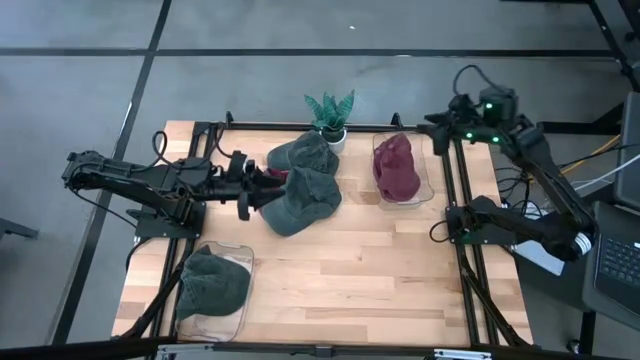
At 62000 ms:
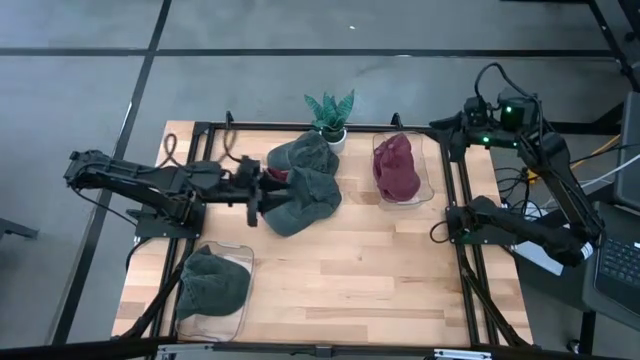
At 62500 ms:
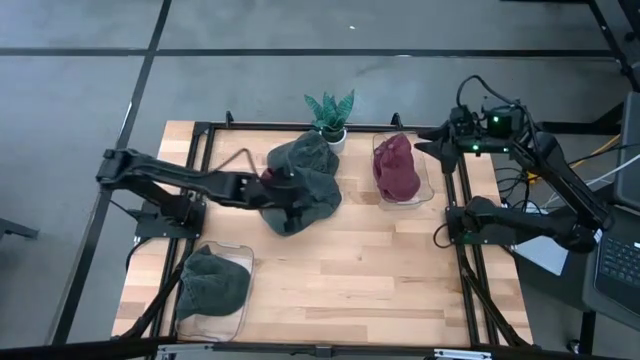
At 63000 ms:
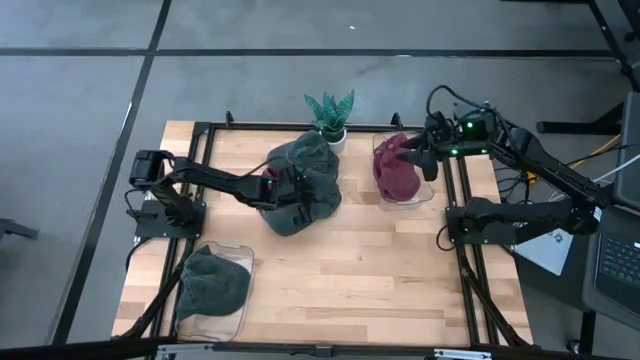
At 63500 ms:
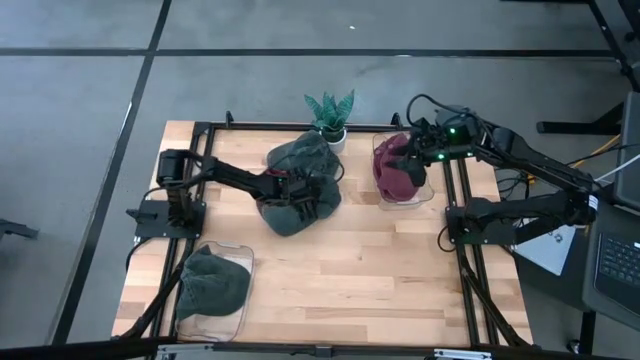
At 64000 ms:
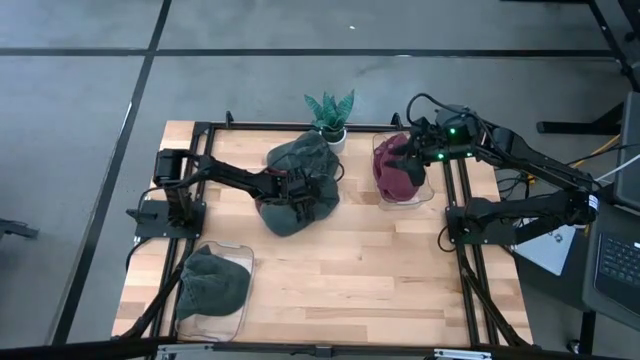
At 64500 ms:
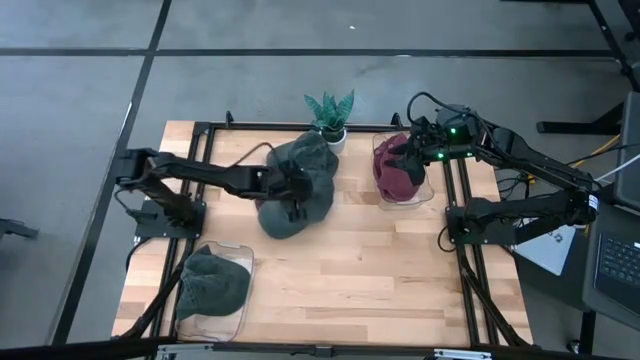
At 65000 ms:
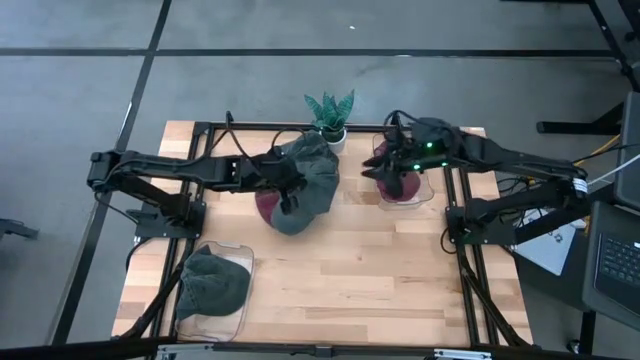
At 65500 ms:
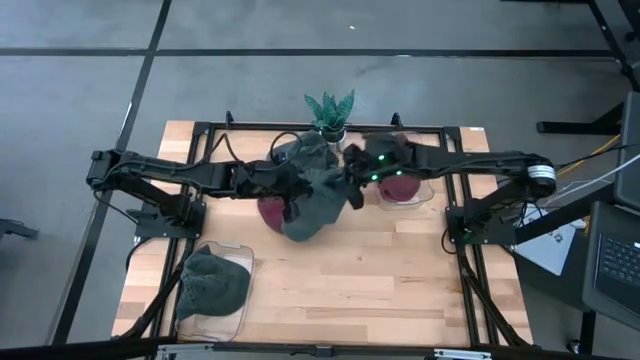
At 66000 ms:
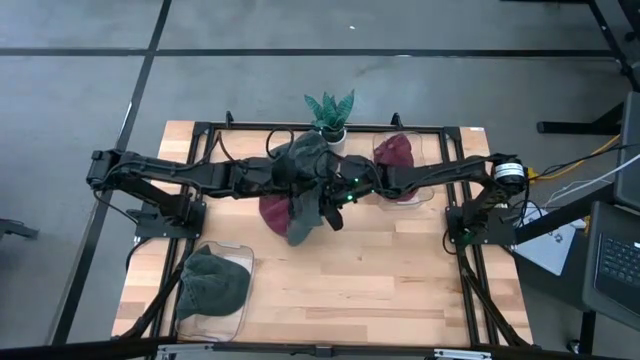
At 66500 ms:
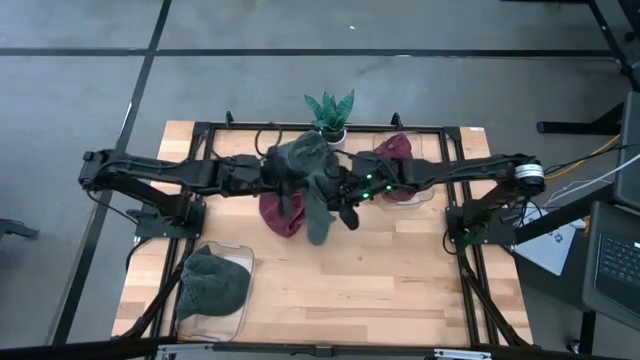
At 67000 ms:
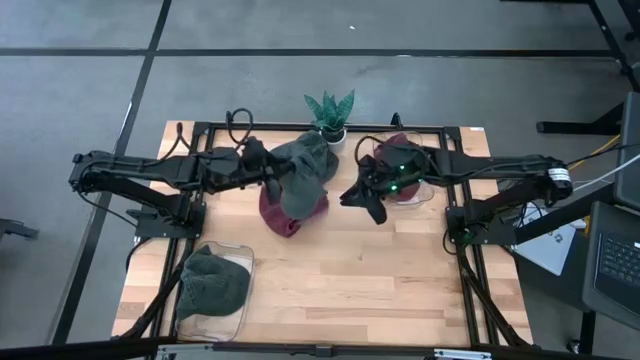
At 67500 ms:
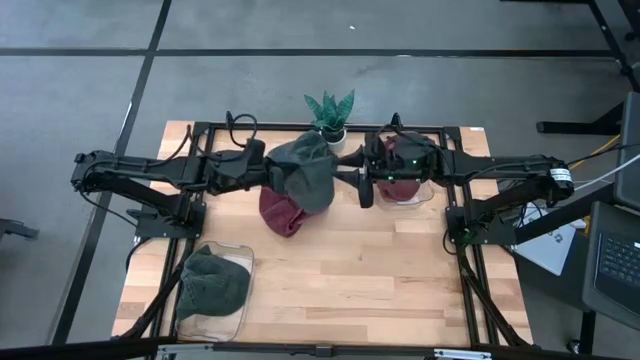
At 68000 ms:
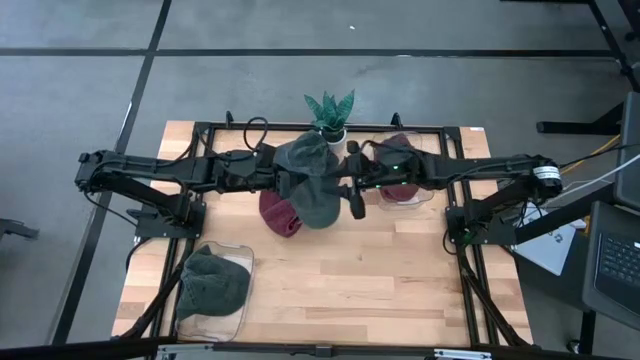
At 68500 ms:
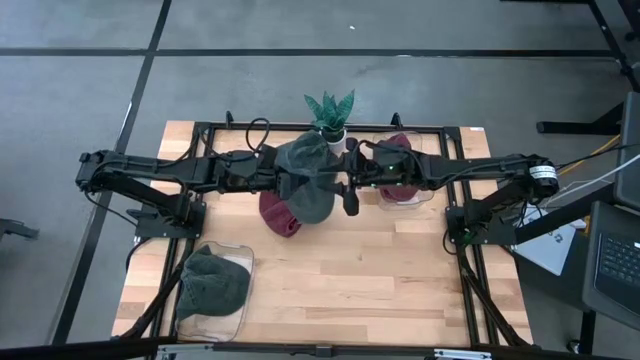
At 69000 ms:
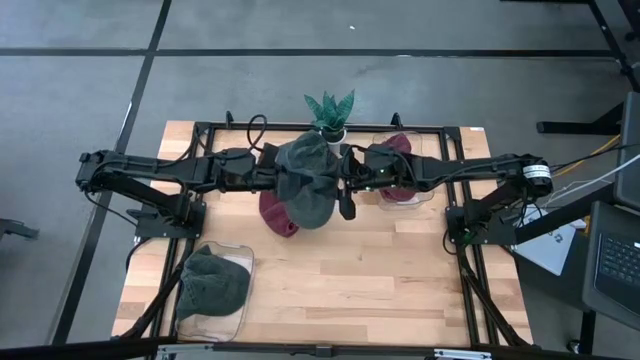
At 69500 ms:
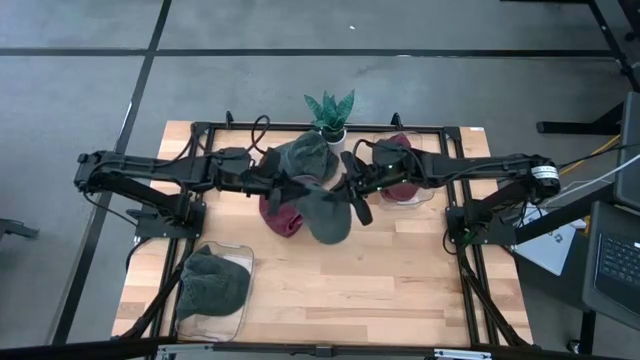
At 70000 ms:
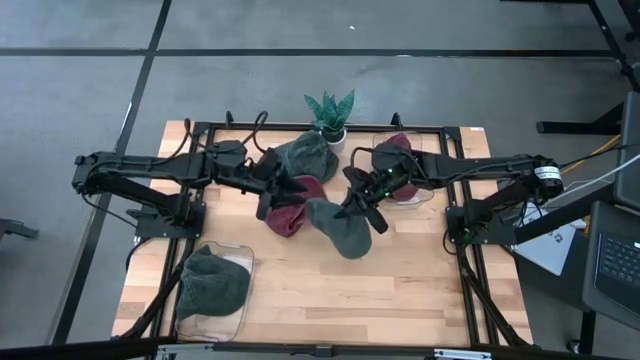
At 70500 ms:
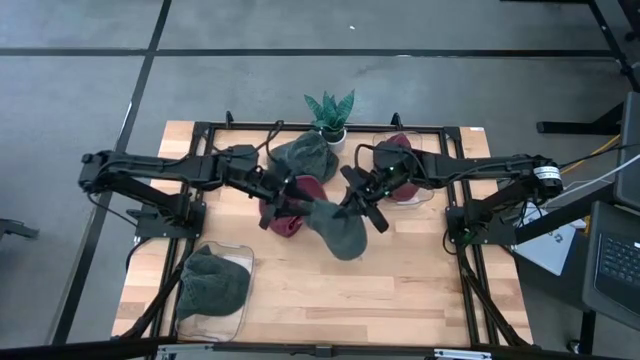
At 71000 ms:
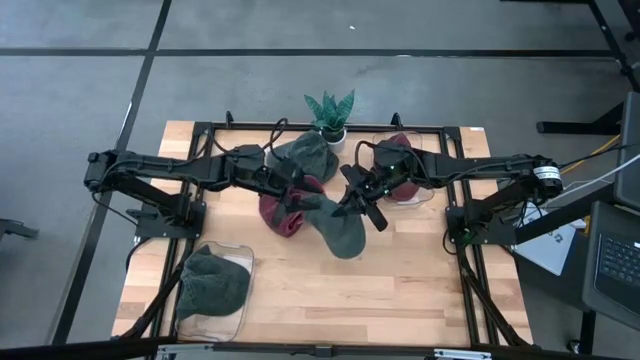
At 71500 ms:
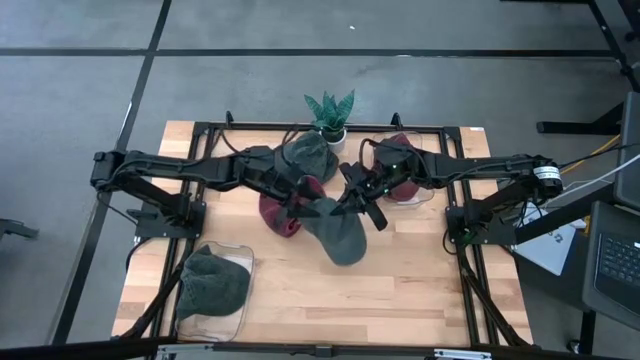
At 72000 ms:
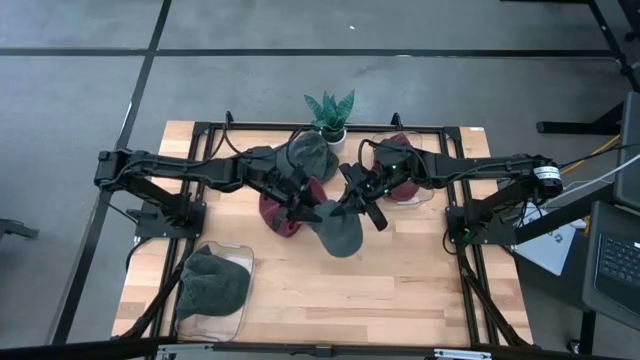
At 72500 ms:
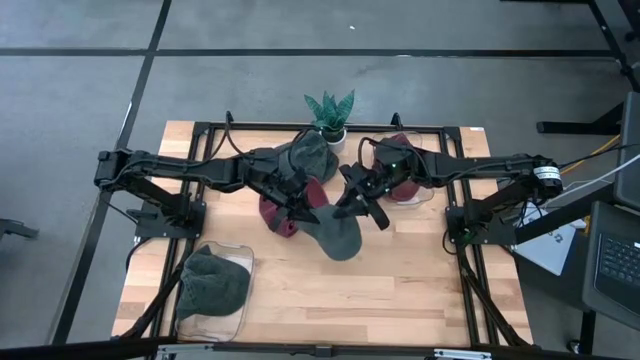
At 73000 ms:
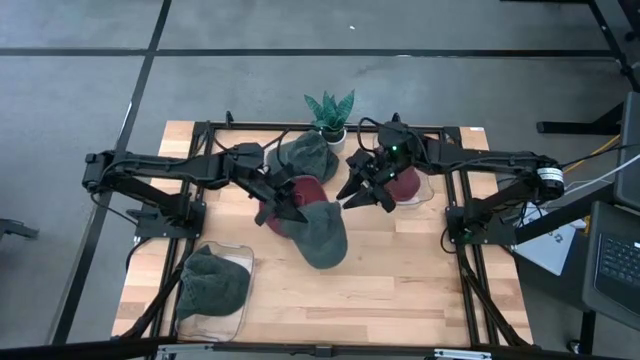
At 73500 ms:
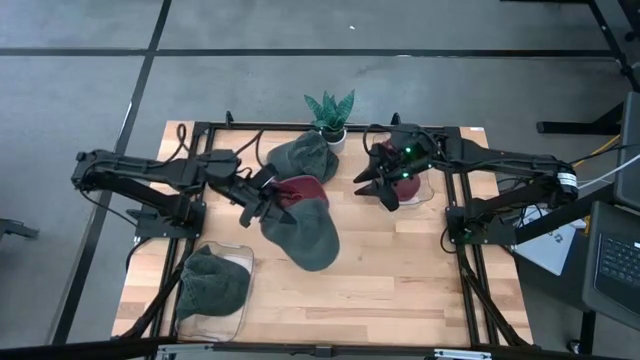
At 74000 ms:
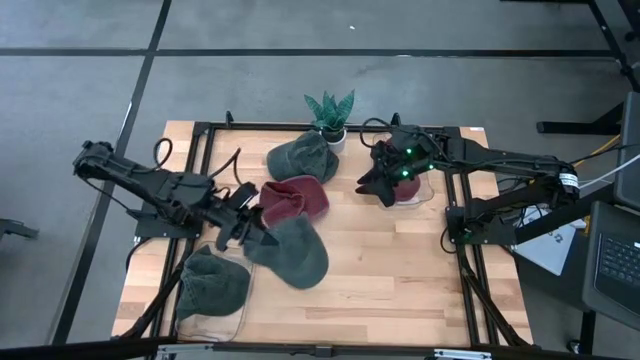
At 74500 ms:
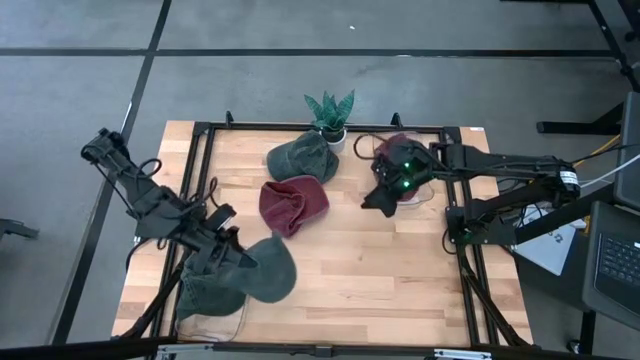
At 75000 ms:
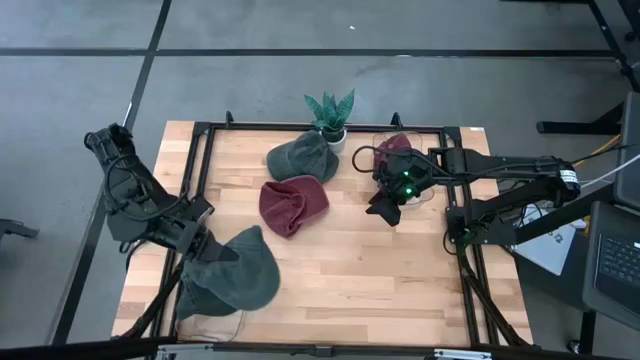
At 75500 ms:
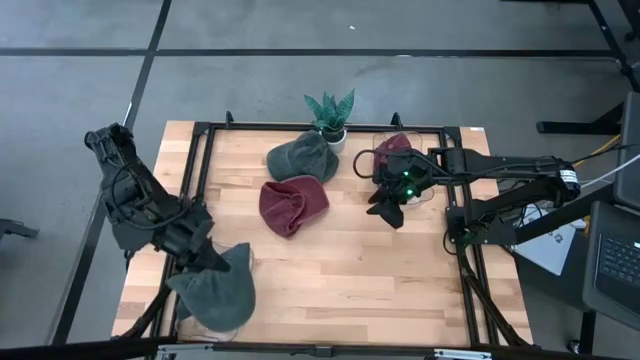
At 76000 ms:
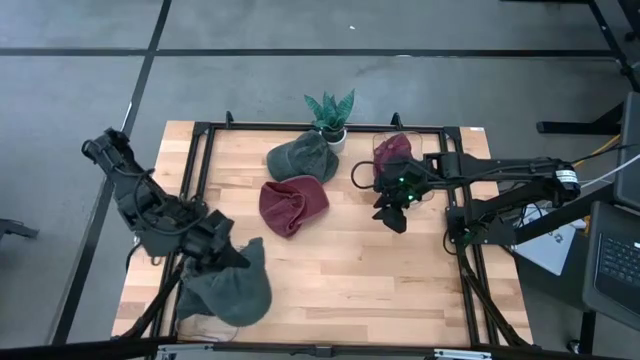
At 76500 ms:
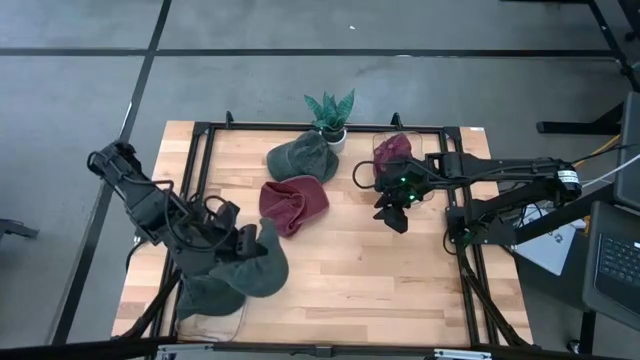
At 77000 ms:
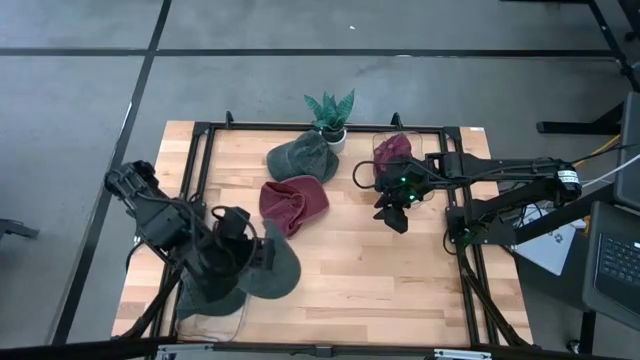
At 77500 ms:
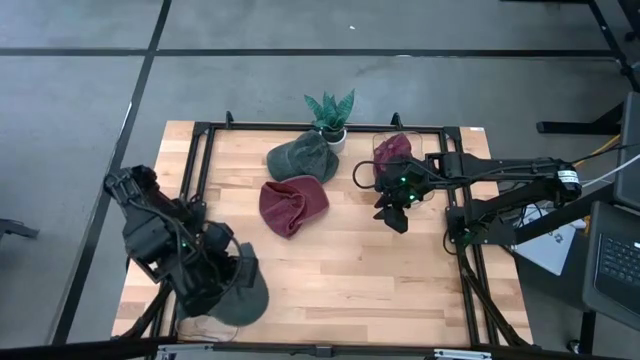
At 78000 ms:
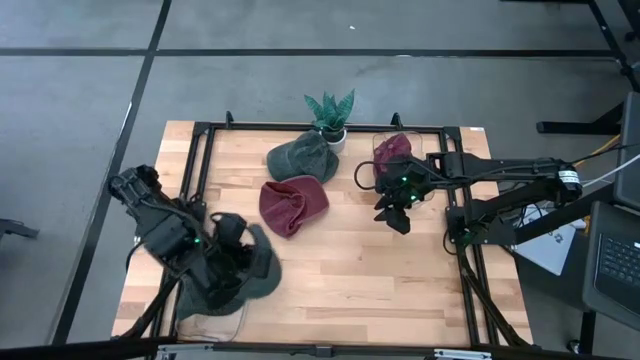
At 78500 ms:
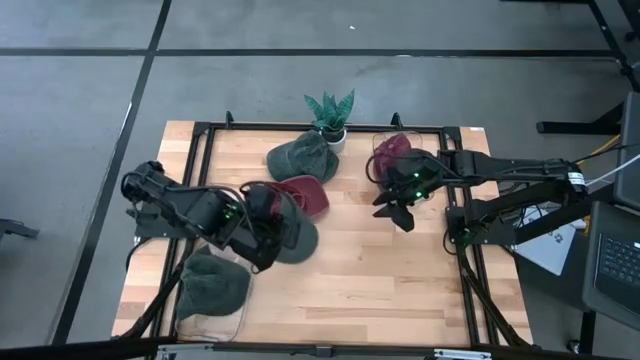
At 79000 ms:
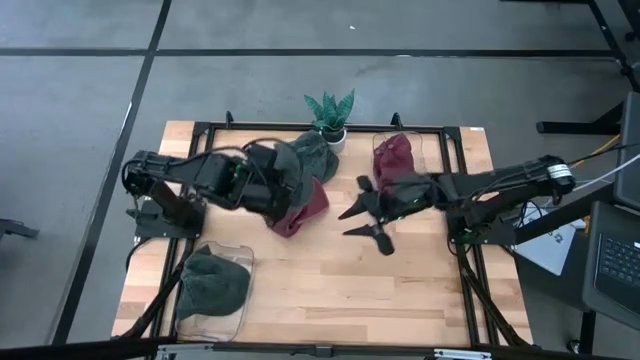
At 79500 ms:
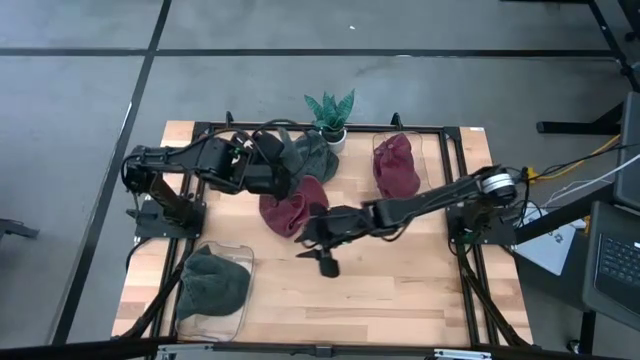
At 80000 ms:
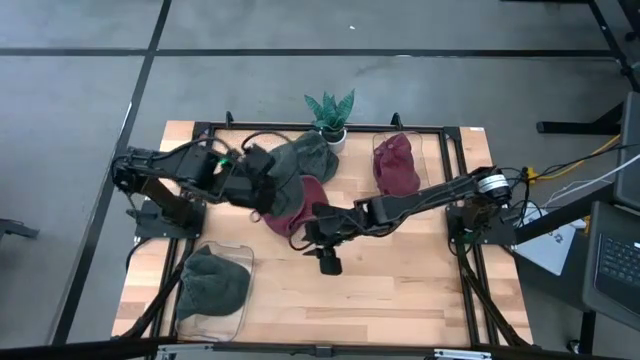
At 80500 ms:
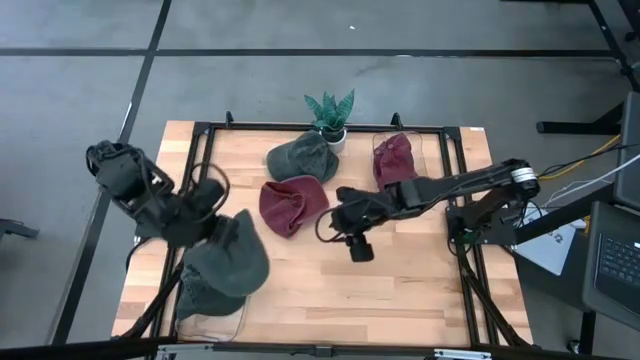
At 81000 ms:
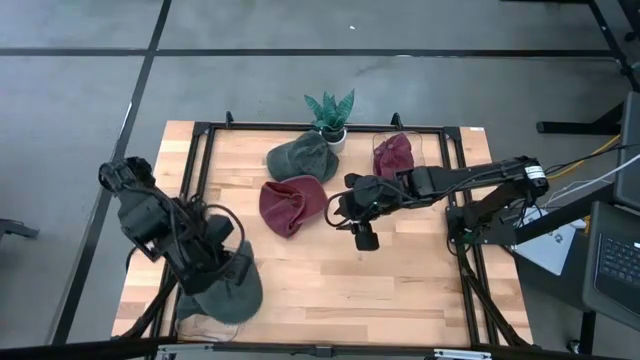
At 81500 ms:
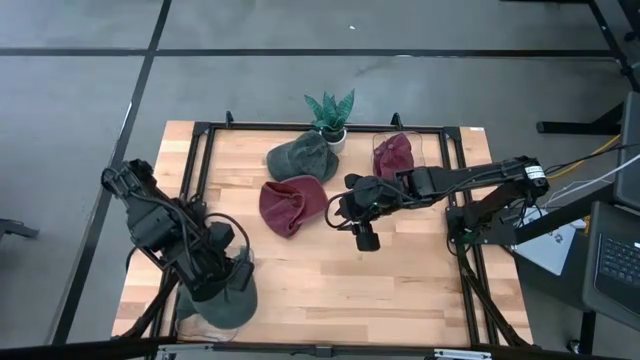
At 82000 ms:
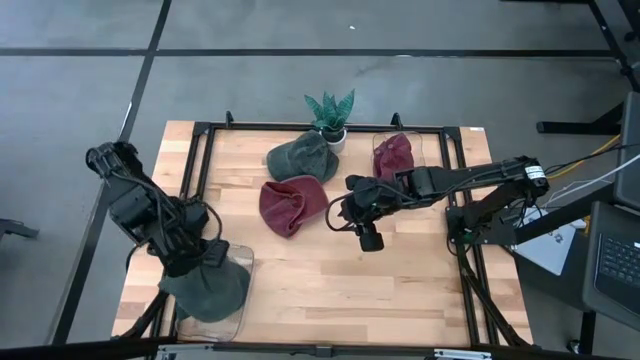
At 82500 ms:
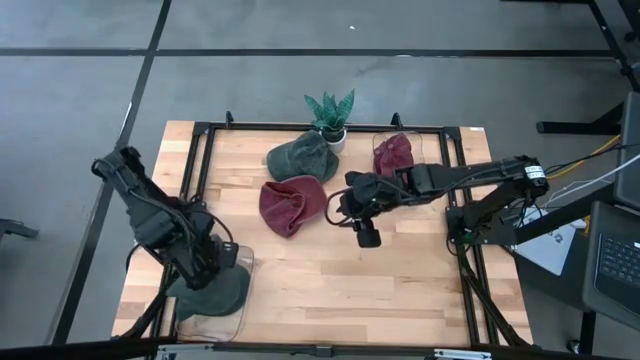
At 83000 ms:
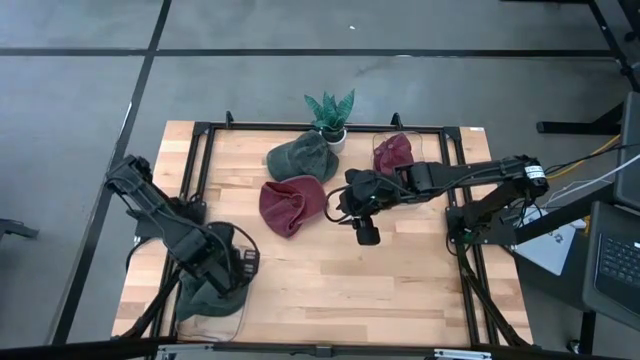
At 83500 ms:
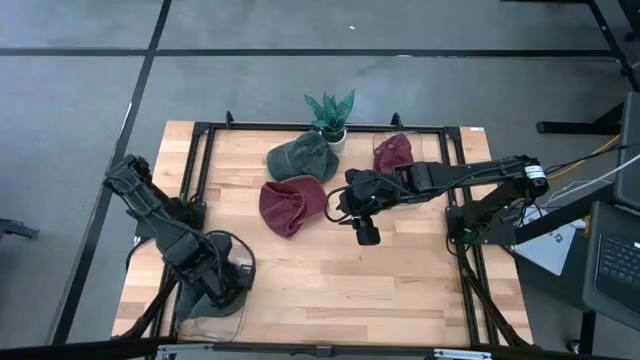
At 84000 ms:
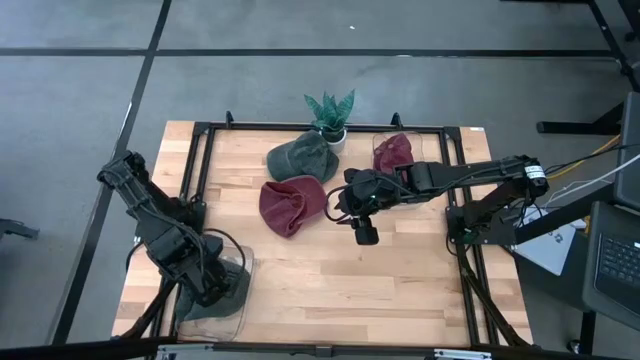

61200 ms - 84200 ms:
Task: Pick & Place hat
Put the bottom gray cap into the bottom left transparent bin
